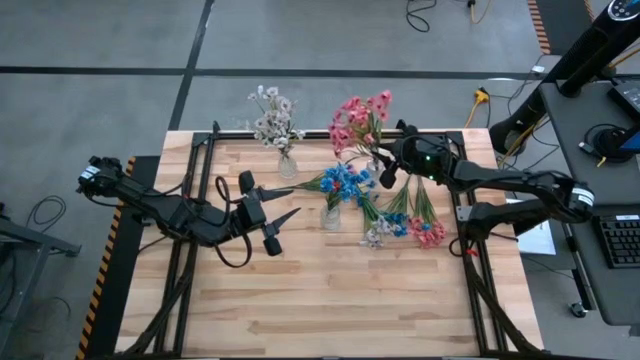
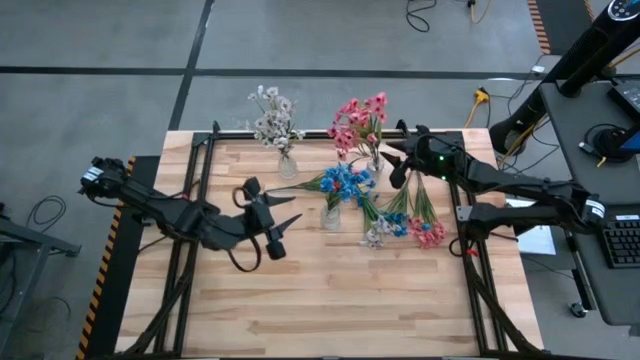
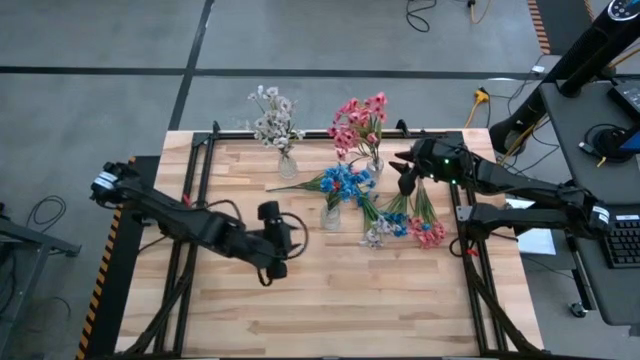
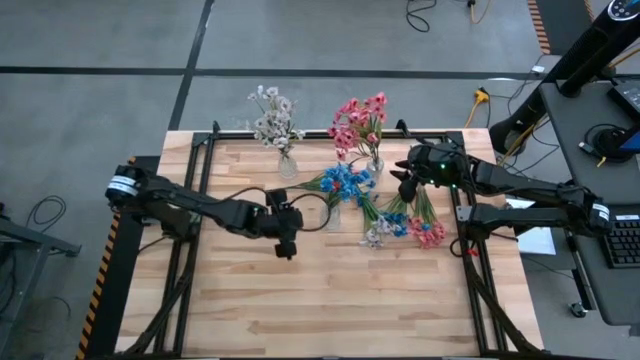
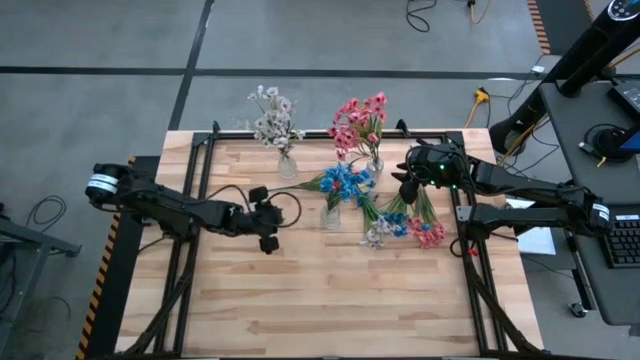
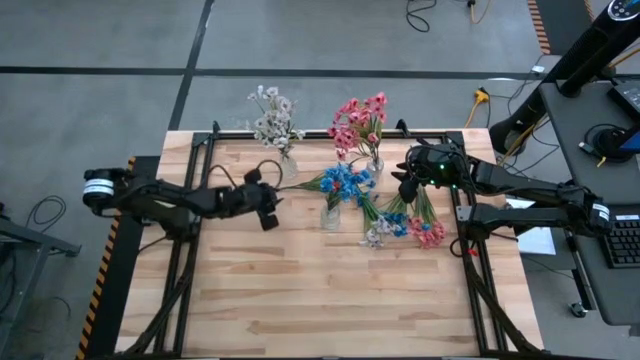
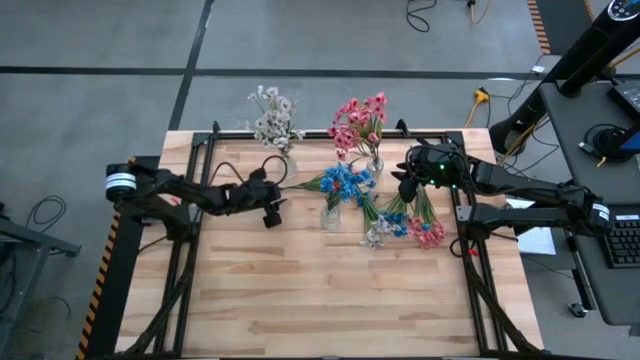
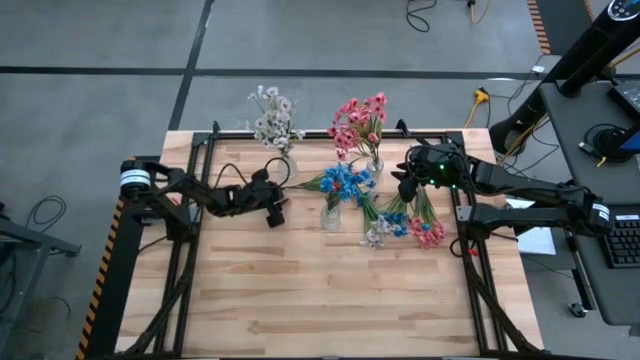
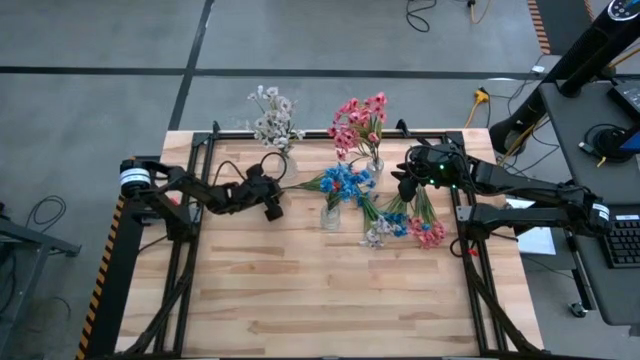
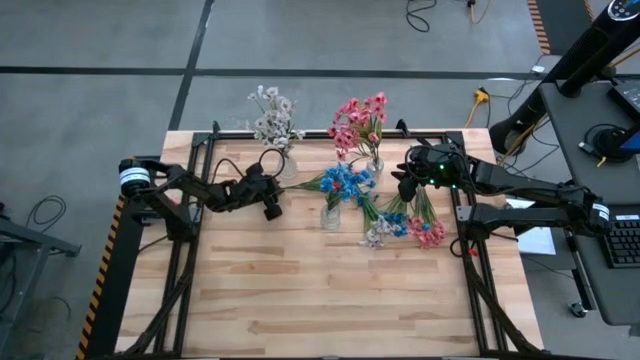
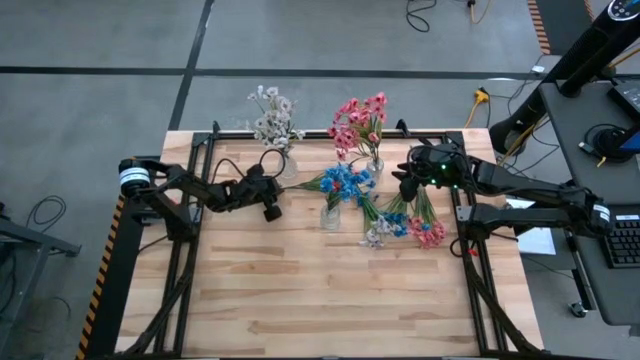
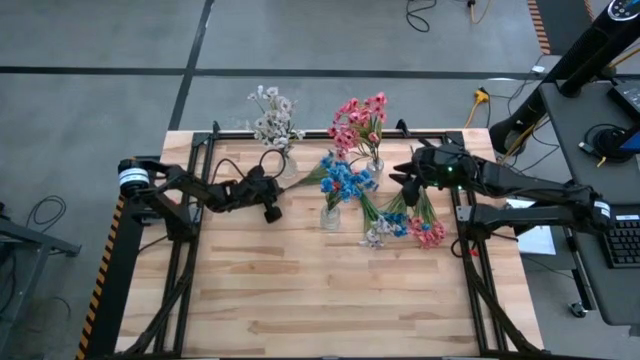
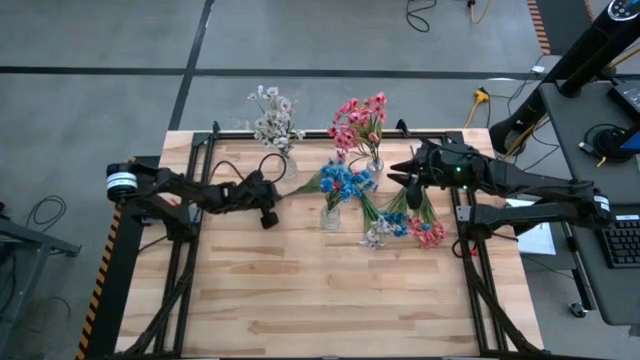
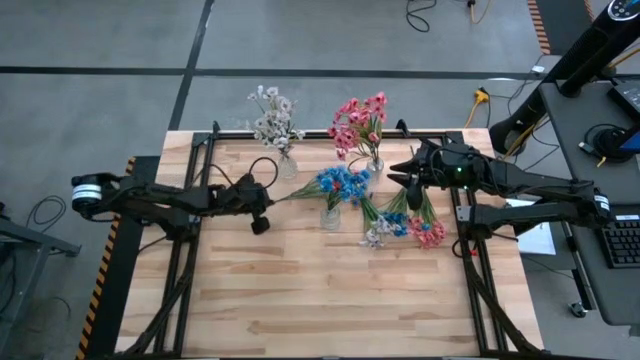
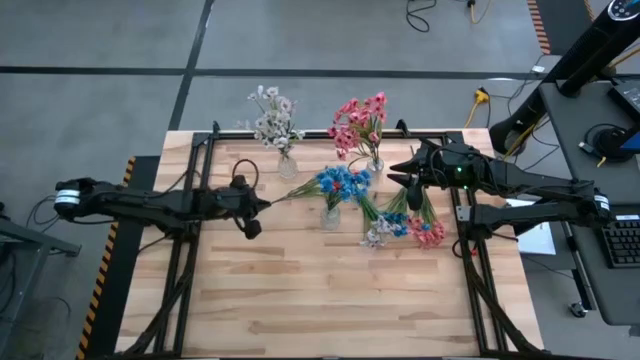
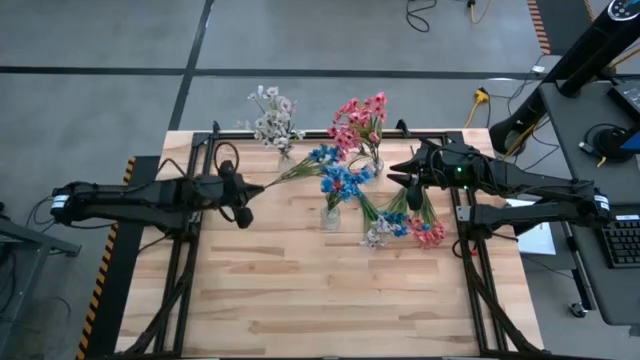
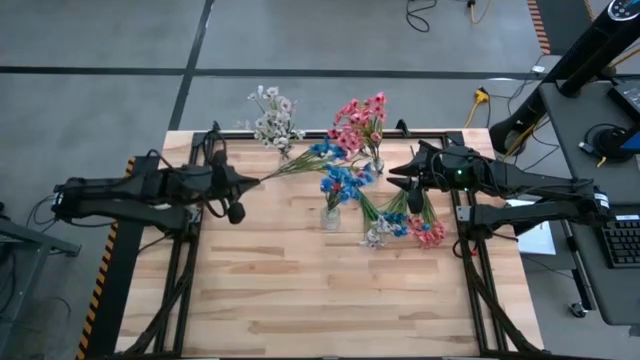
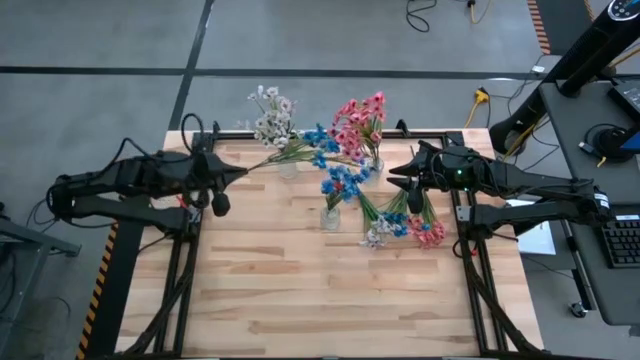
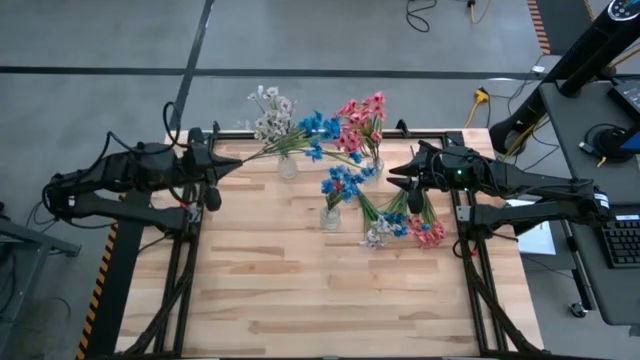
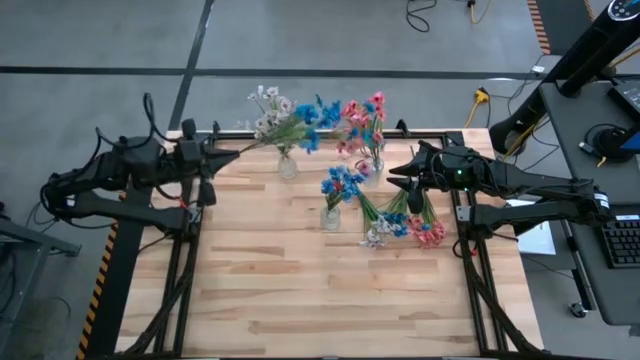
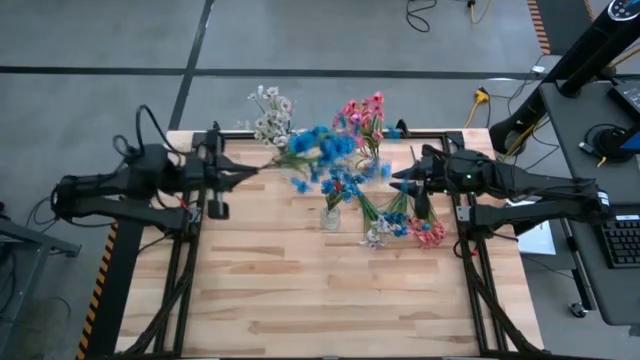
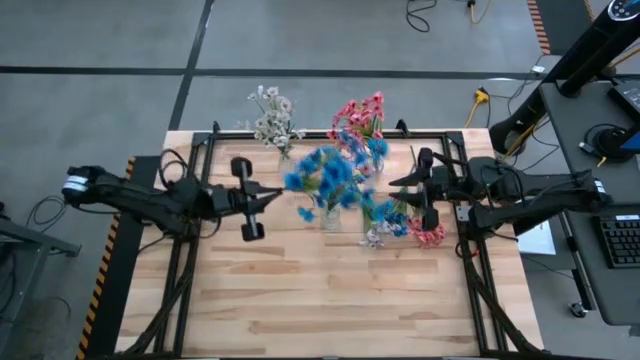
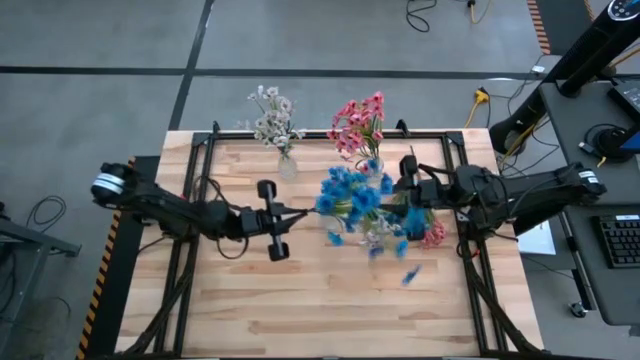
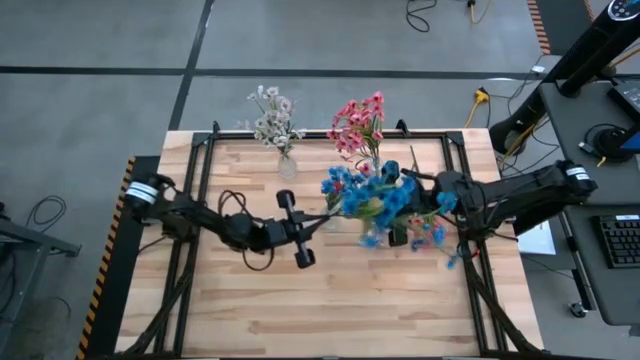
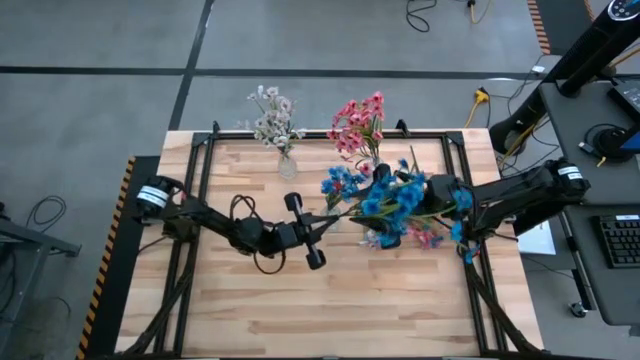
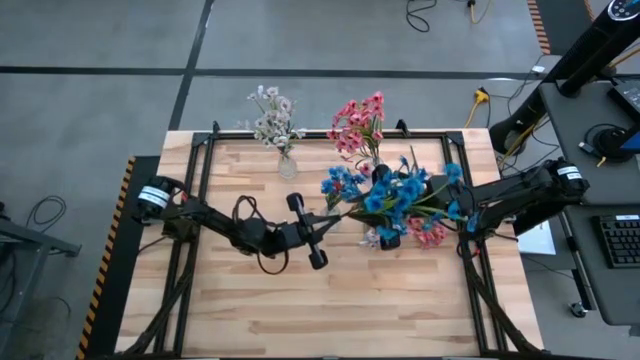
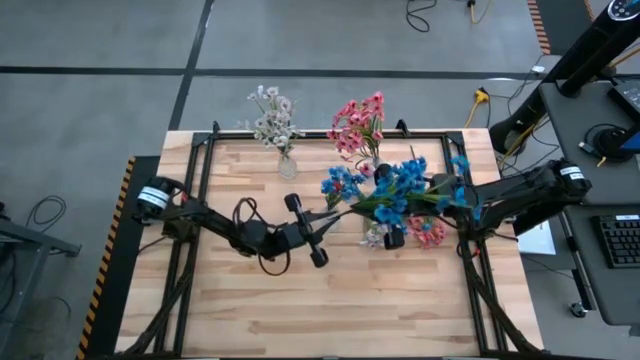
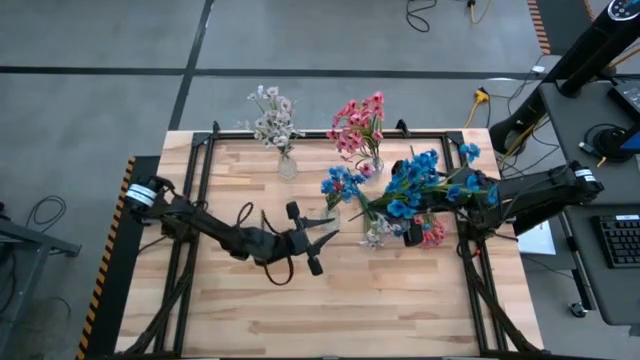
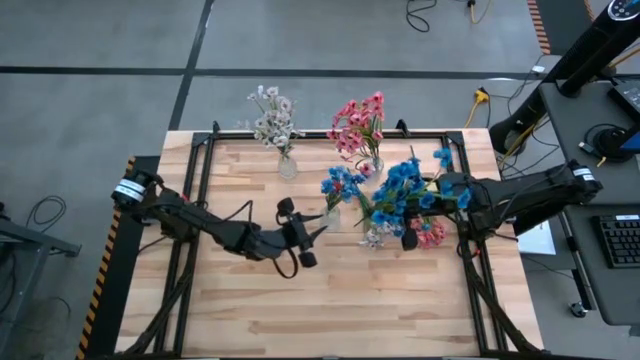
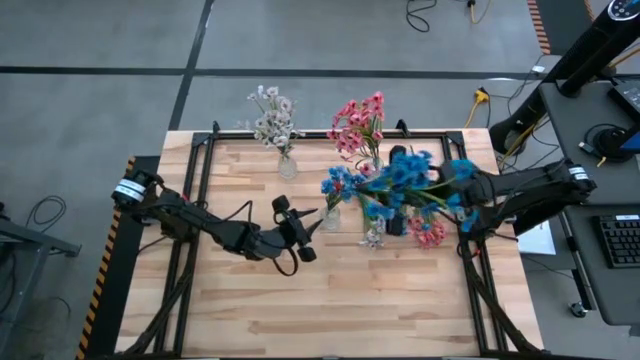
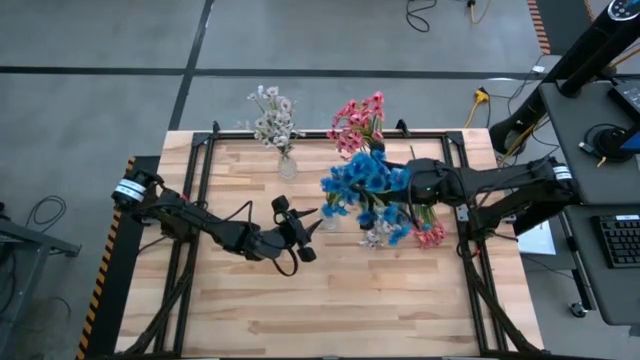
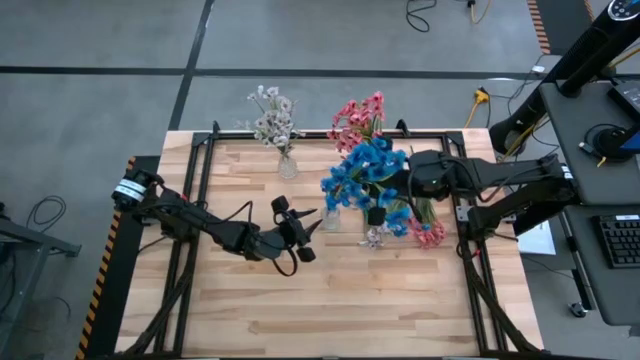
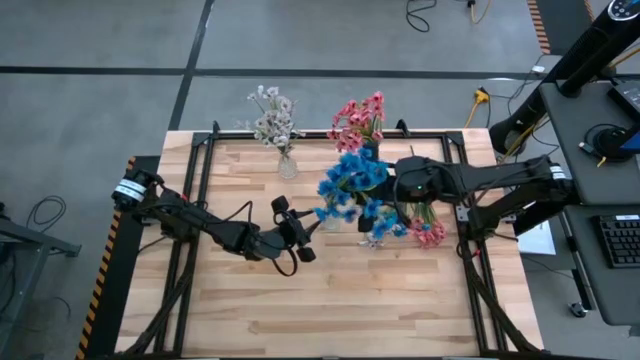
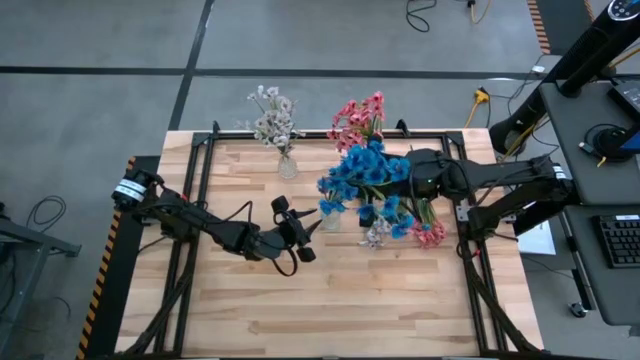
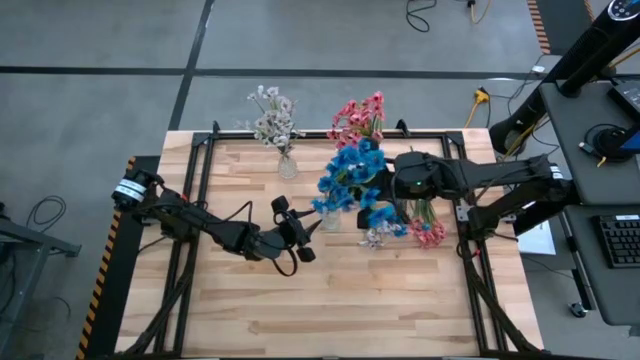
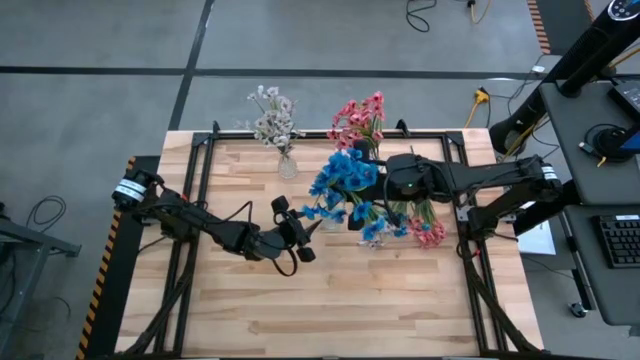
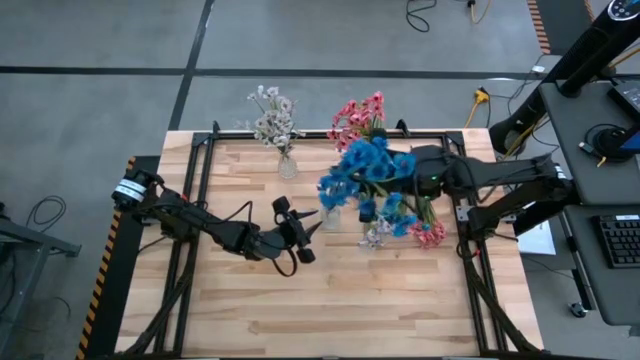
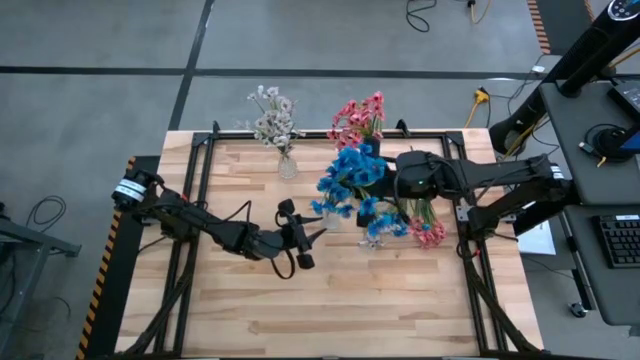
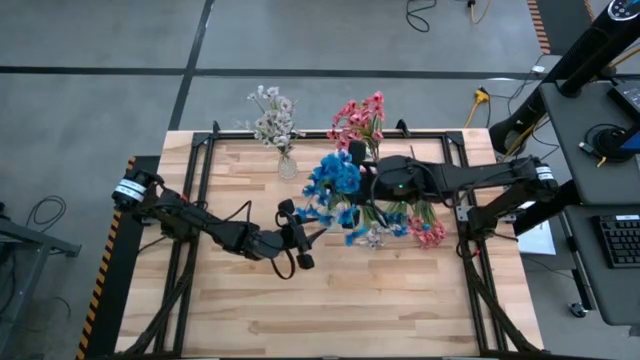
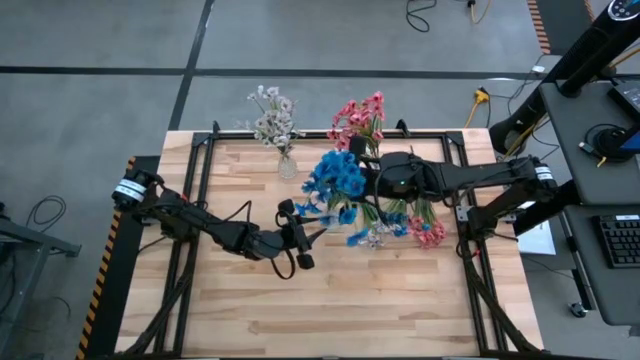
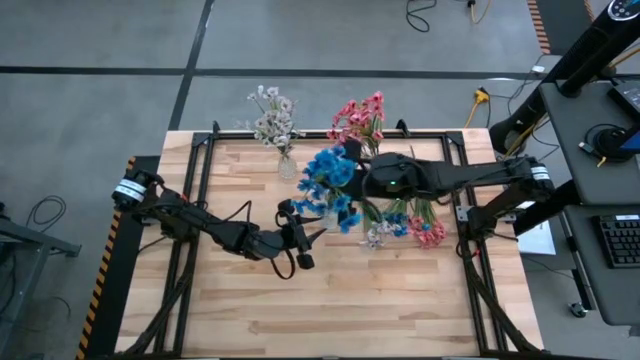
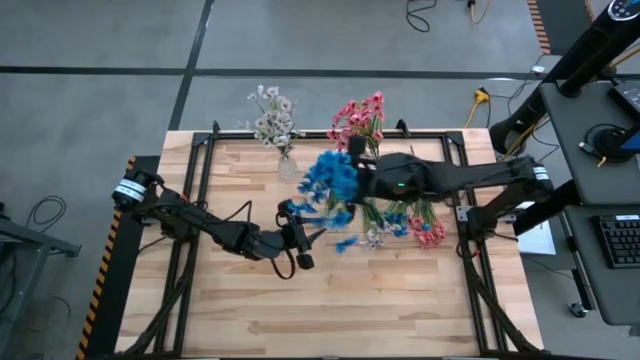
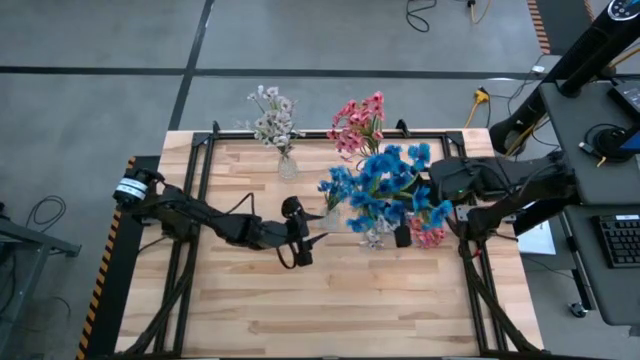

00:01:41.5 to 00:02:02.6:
Task: Sort flowers into vase by color
Put the left blue flowers into the middle transparent vase
